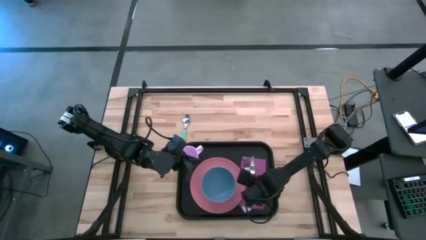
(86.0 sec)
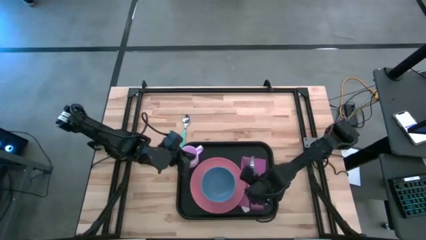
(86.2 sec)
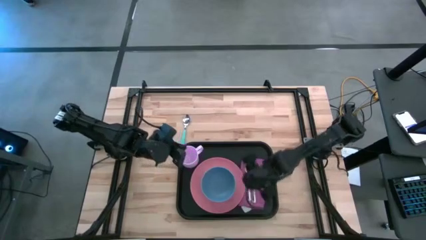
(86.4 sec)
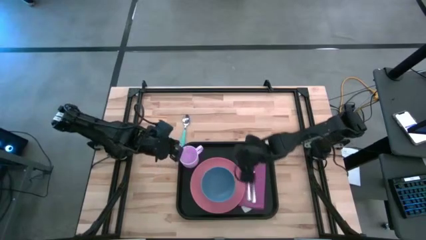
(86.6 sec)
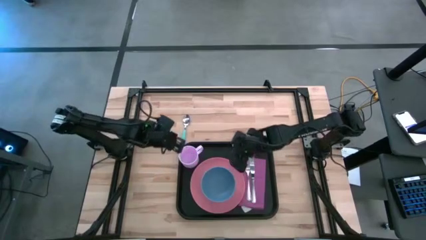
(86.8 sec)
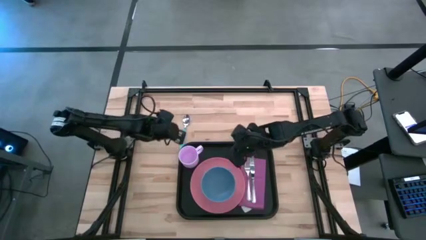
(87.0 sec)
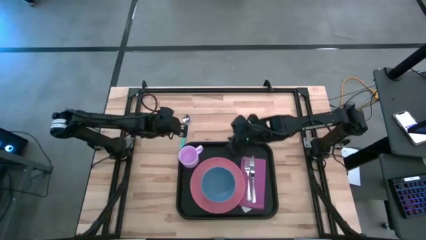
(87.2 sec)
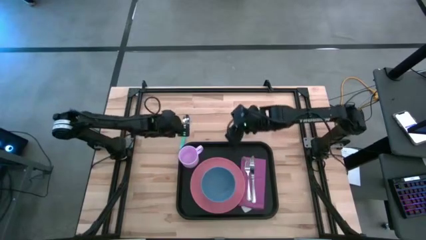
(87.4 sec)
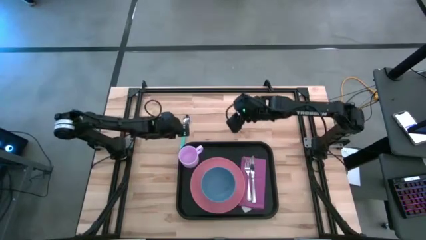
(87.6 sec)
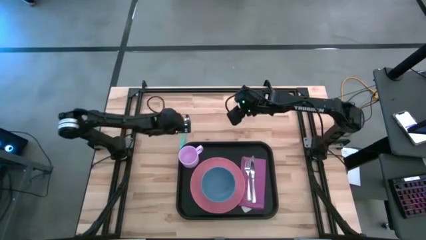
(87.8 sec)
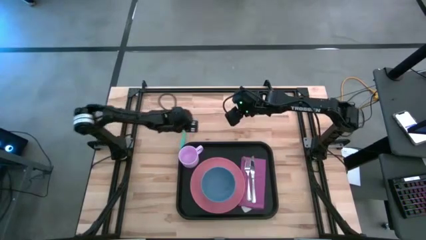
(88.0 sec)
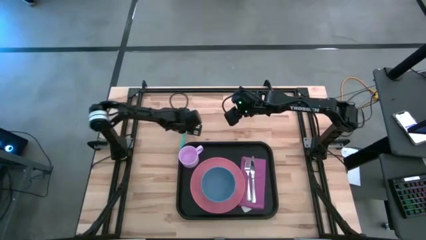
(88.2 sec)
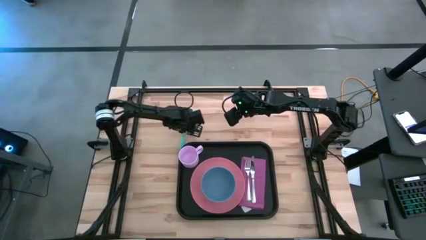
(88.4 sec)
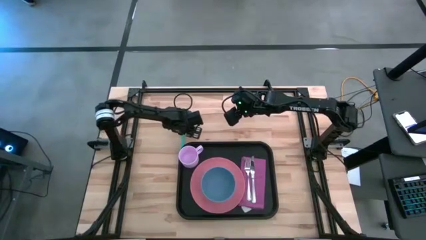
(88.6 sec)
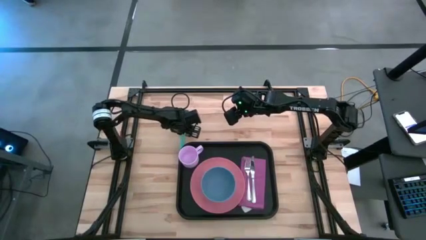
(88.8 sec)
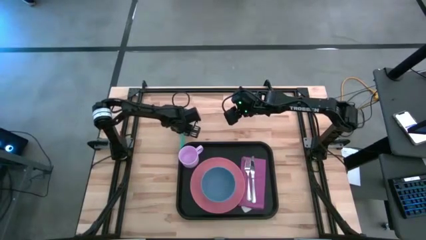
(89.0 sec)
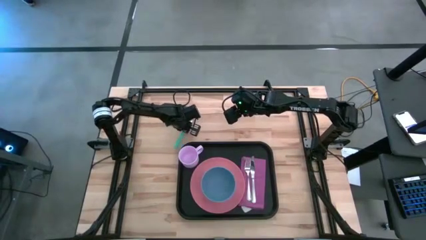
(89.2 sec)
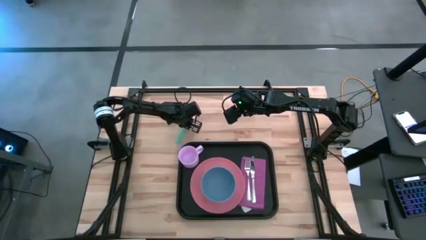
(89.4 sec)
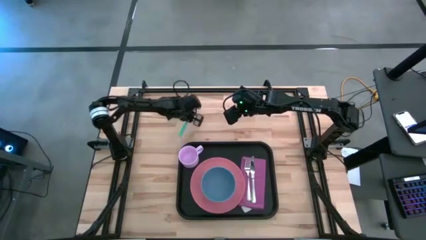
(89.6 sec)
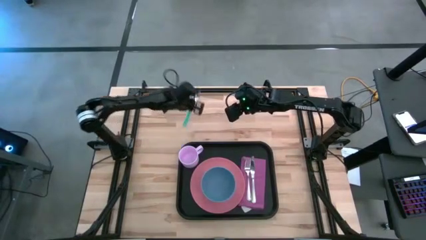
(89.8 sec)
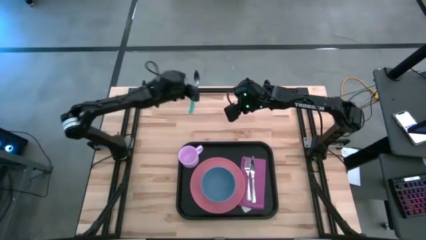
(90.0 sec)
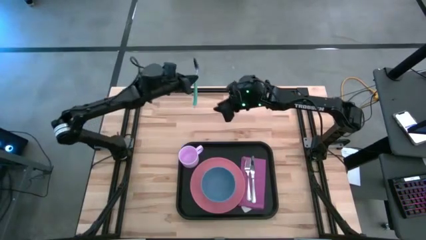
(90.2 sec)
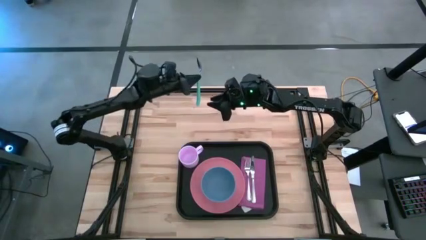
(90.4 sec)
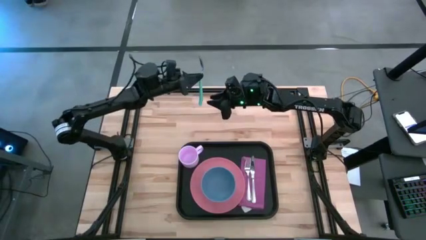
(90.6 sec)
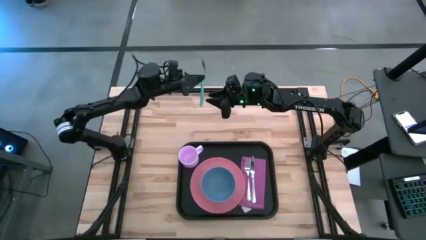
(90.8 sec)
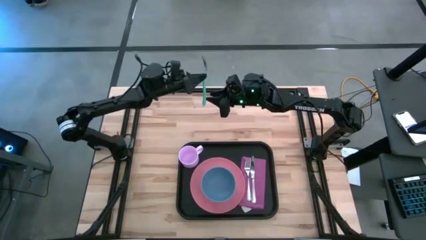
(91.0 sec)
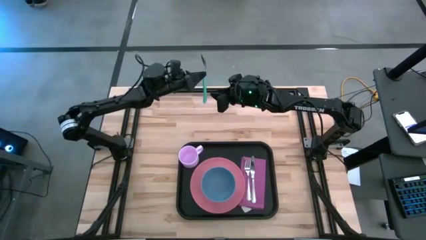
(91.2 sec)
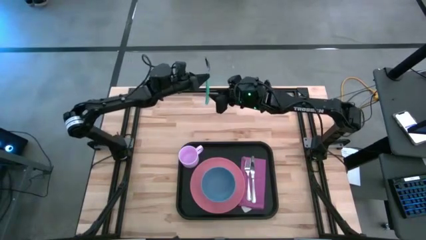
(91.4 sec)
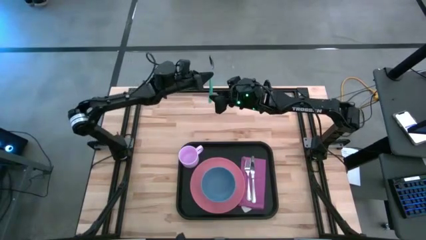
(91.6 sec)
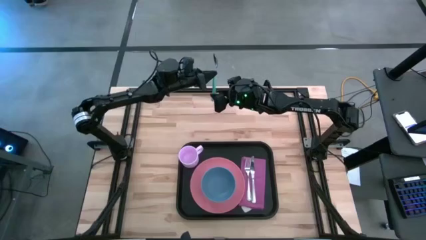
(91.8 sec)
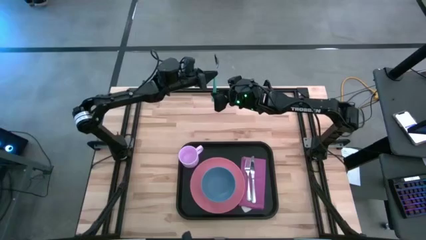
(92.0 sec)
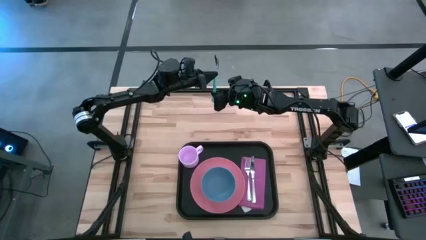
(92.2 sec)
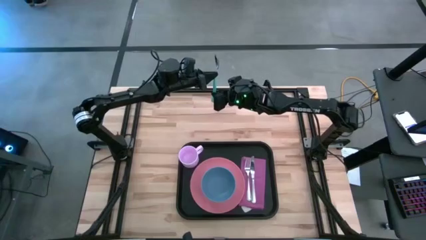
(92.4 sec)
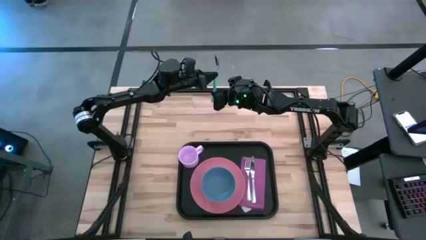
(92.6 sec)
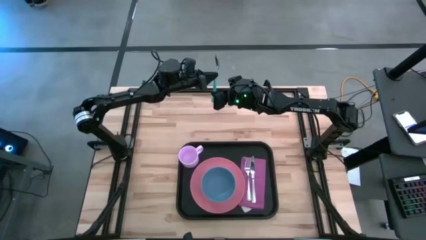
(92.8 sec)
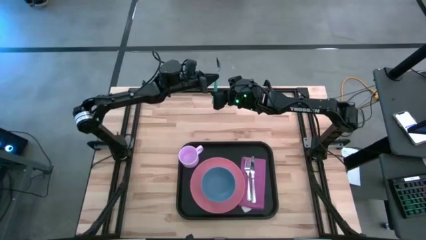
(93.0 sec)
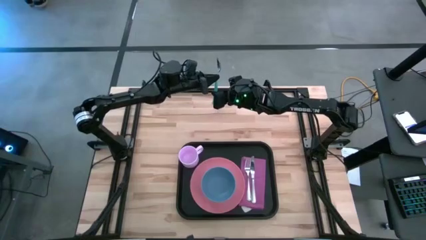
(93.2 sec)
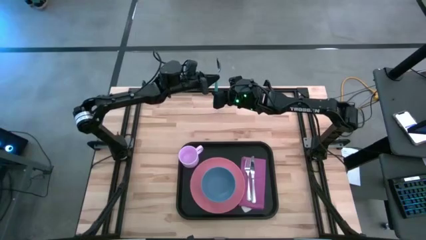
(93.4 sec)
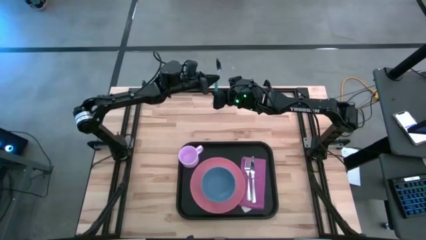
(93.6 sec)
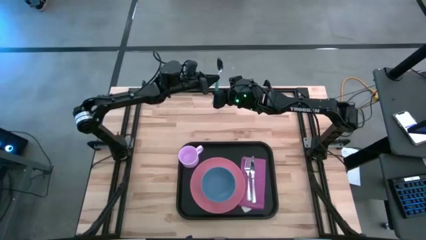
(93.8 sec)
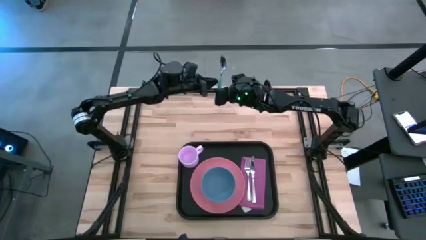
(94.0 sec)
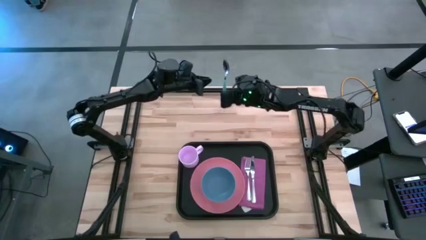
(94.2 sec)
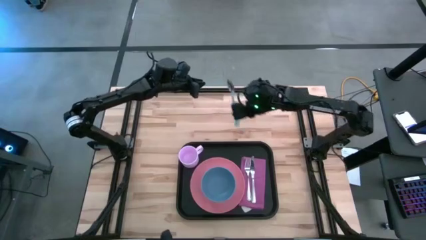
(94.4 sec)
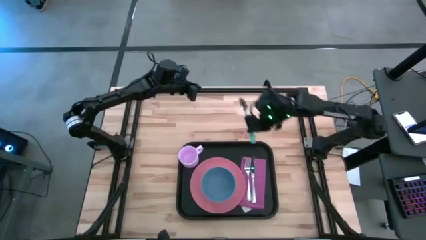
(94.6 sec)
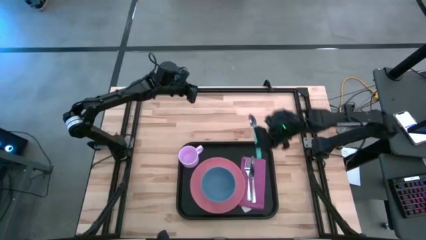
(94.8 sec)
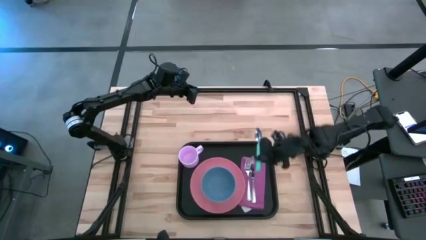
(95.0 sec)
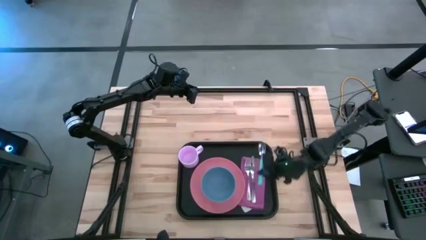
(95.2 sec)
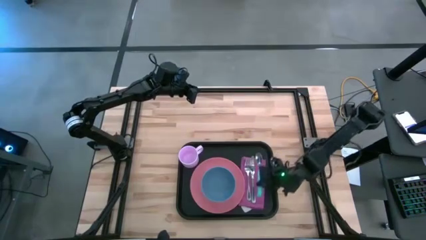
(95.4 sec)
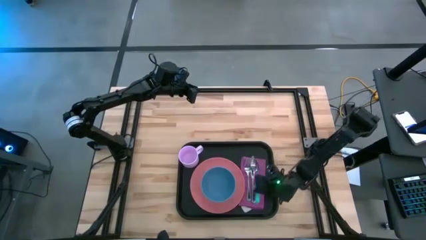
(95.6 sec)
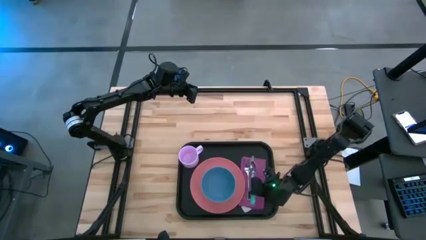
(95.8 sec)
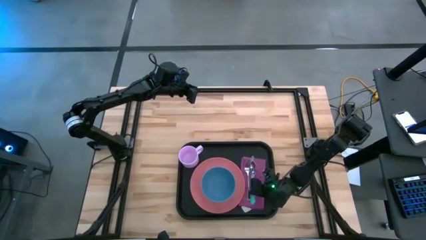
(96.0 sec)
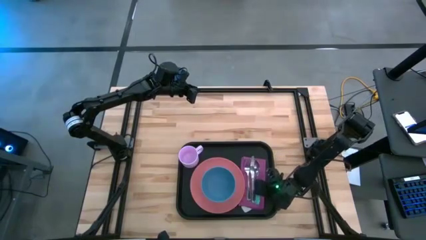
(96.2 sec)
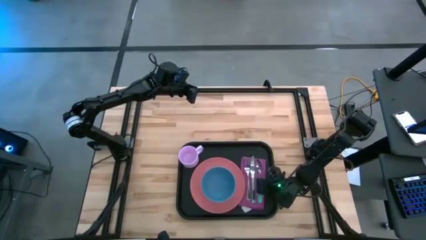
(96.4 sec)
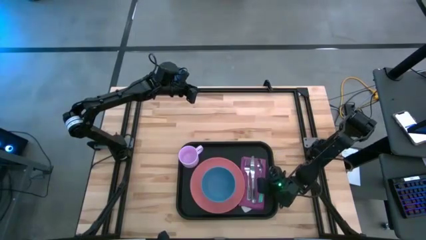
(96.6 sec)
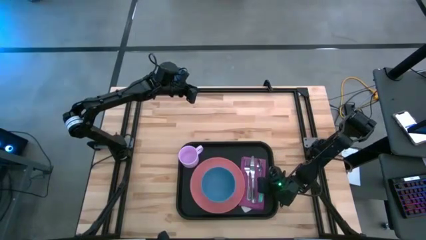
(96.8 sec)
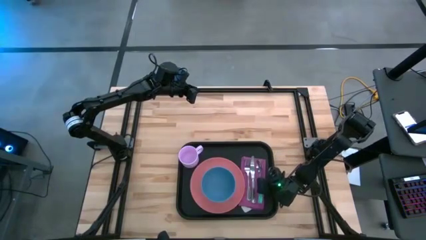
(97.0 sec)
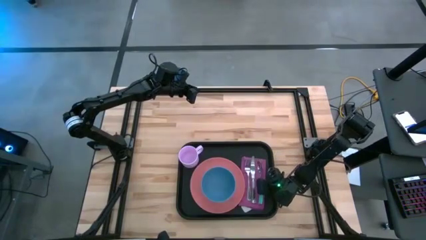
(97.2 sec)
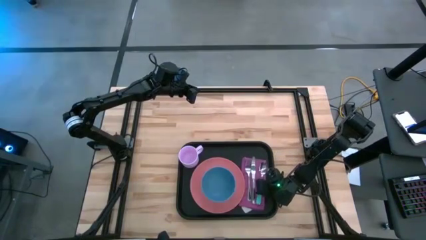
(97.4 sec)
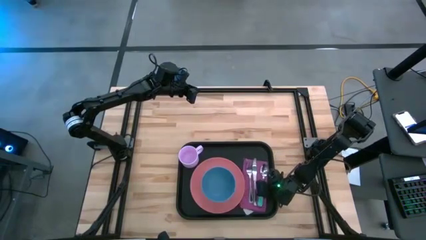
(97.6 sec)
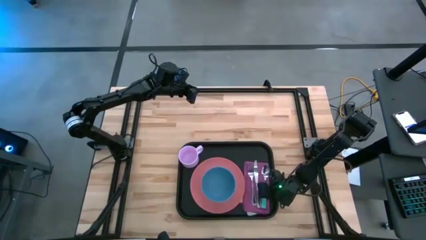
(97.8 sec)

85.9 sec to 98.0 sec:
Task: Set up tray
Put the blue spoon on top of the purple napkin to the right of the silver knife on the black tray
